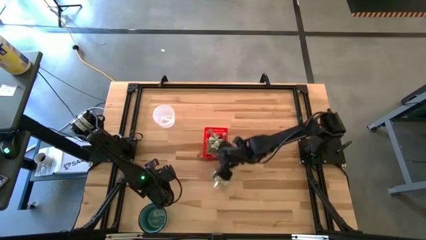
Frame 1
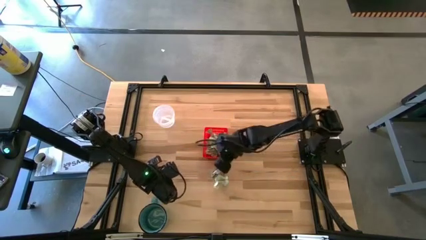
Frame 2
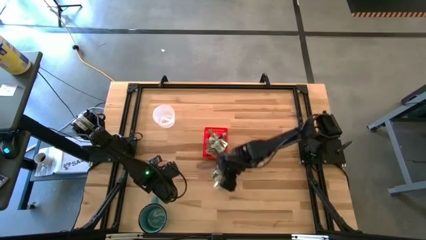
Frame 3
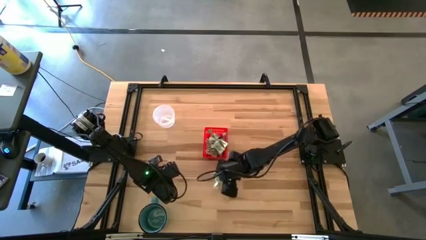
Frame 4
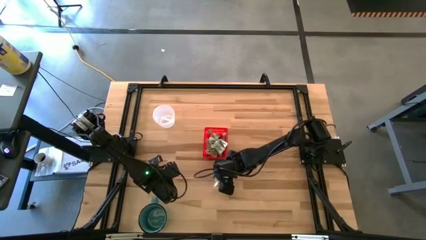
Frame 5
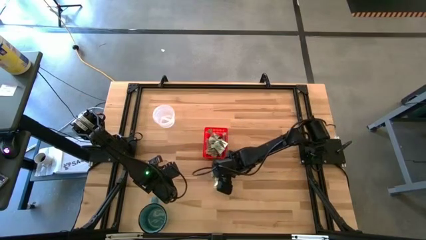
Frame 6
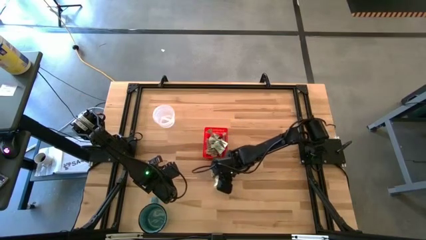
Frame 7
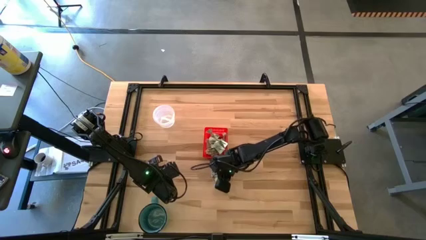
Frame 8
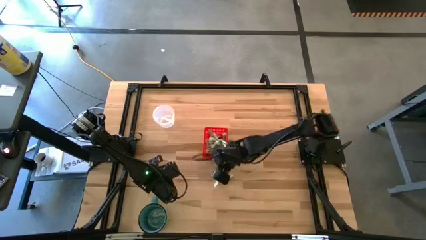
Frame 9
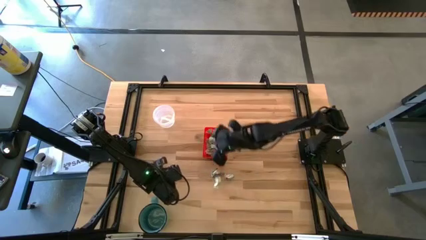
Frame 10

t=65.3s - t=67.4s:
Task: Pick and place Stevia / Truvia into bins
Put the stevia packet into the red basket

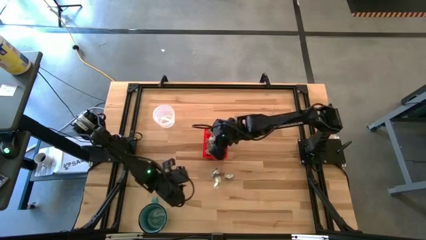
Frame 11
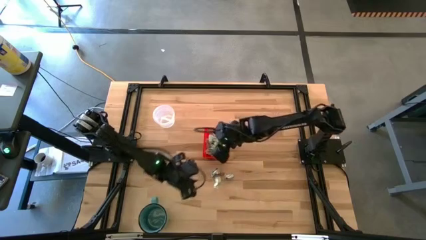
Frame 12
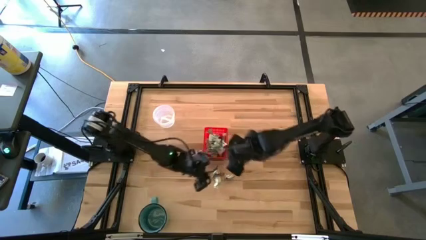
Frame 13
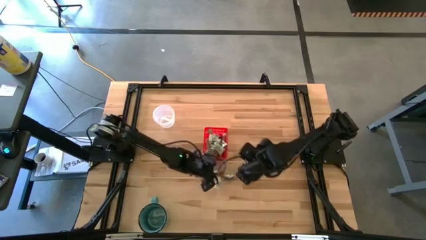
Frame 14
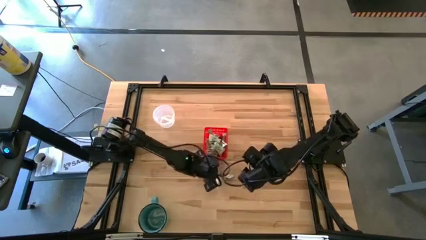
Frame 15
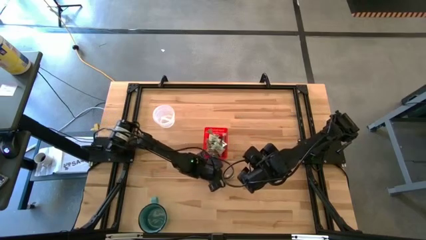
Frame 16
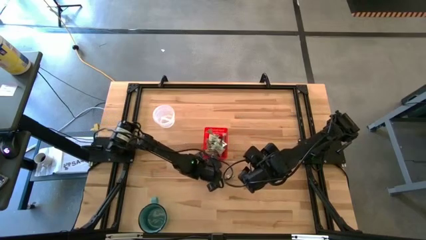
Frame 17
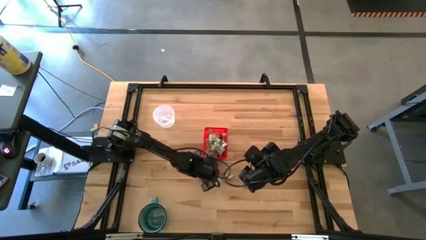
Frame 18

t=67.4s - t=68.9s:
Put the truvia packet into the red basket

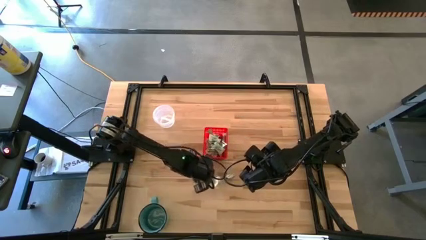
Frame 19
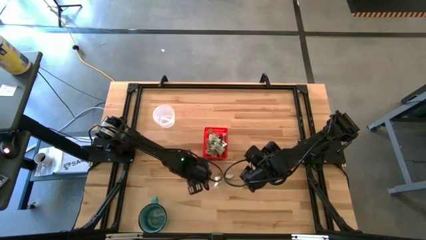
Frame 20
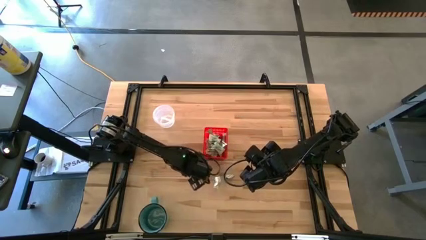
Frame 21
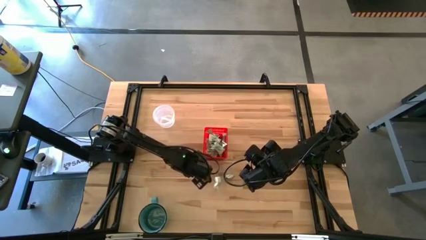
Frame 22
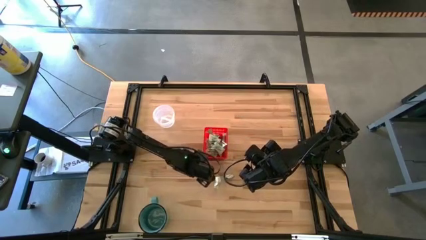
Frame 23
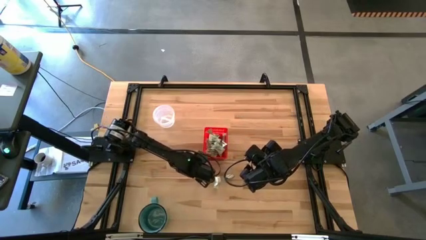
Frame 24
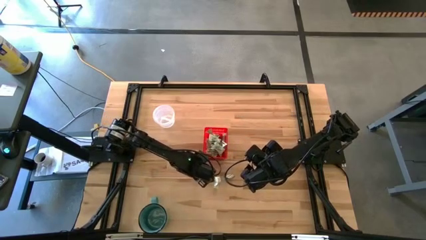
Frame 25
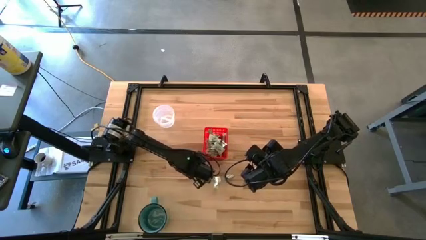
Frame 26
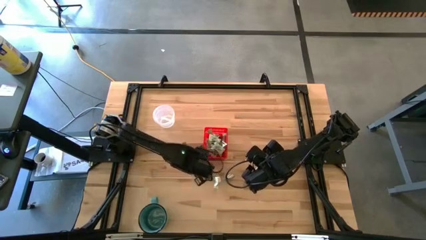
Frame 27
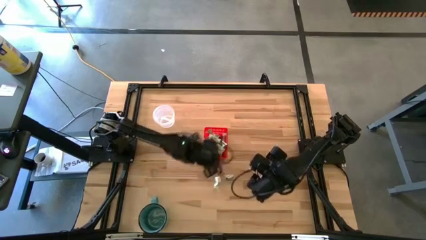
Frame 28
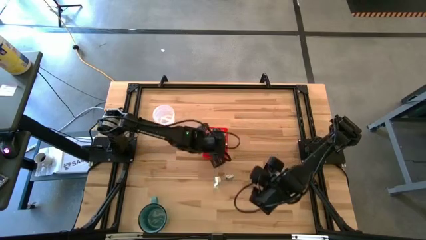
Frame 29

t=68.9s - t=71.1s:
Put the truvia packet into the red basket

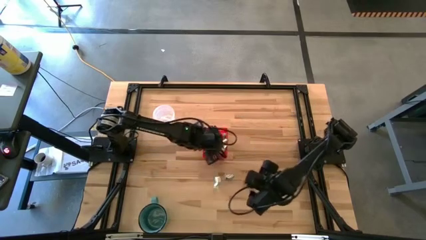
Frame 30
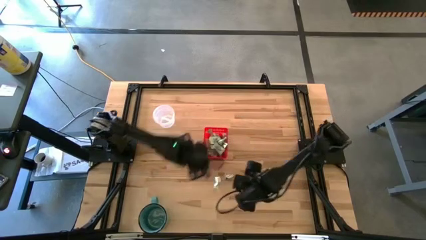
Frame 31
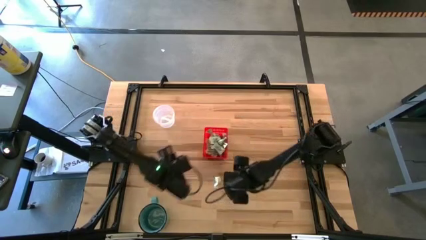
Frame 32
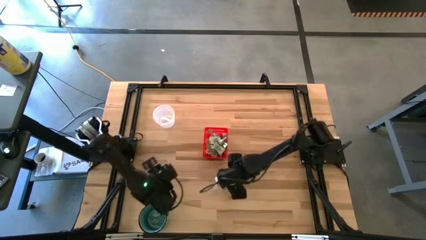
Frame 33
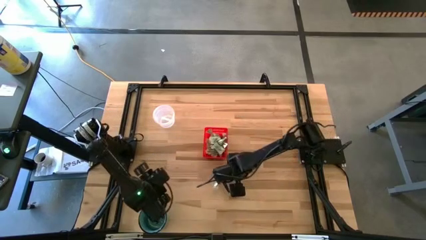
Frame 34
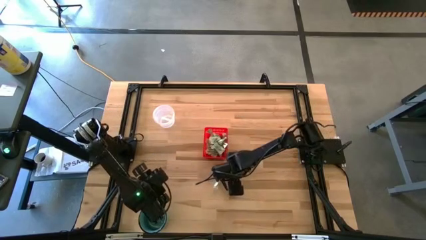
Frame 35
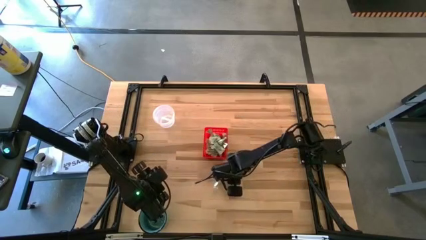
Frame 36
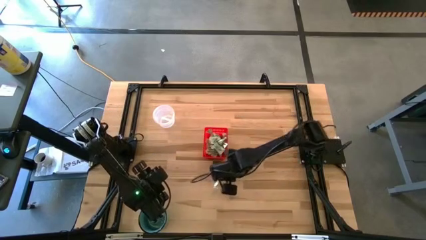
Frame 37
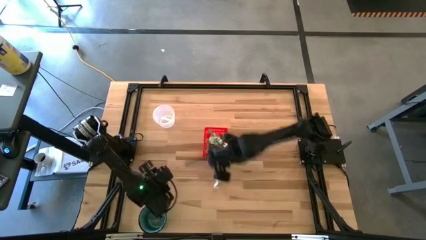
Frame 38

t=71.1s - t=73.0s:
Put the truvia packet into the red basket

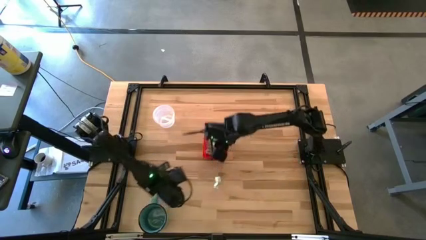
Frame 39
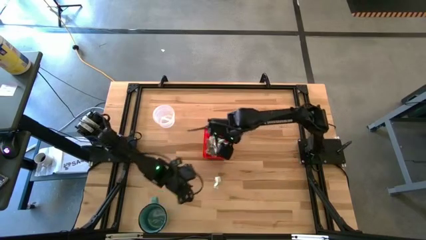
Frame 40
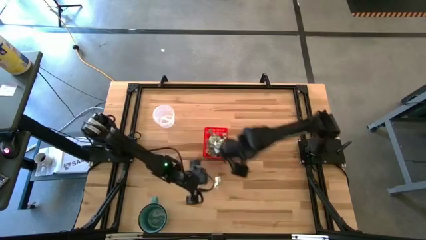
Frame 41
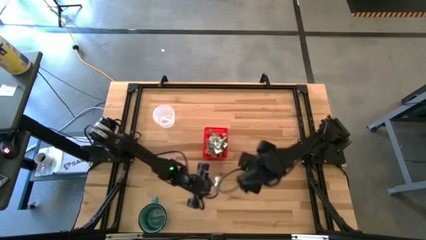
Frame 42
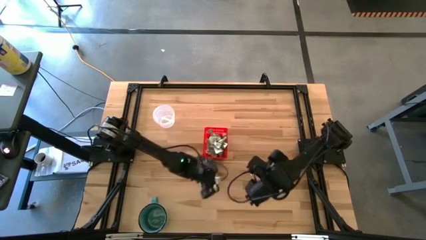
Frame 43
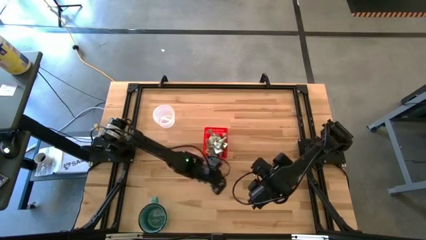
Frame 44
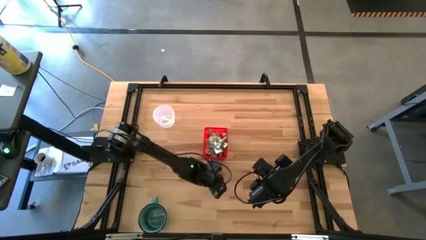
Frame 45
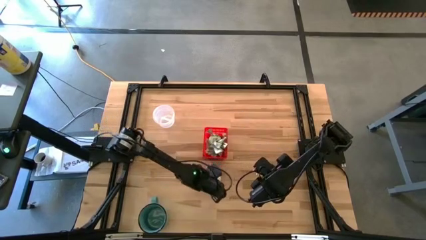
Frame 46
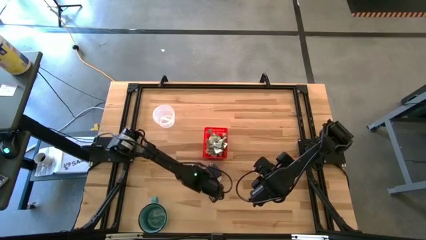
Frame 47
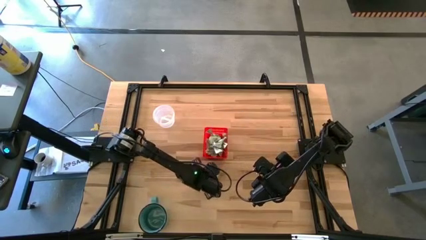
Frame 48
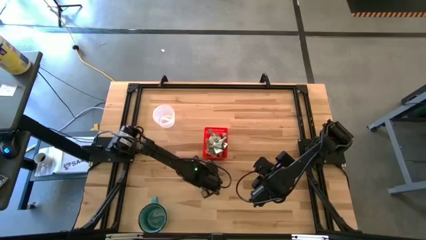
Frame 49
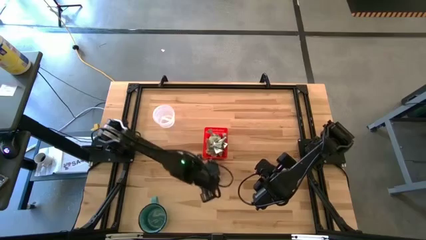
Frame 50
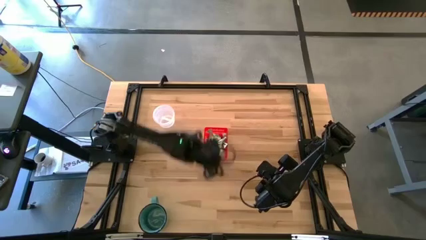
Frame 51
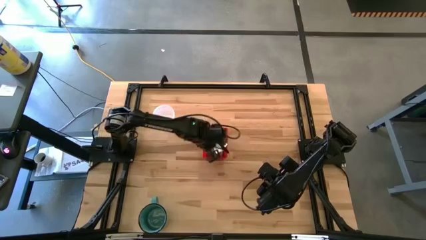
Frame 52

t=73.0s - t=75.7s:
Put the stevia packet into the red basket

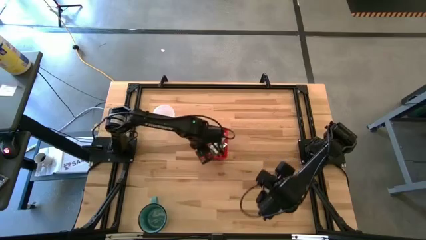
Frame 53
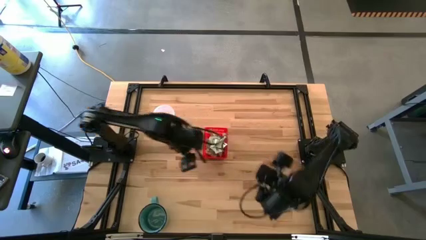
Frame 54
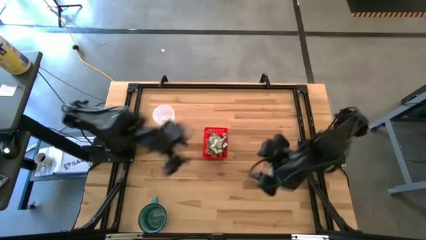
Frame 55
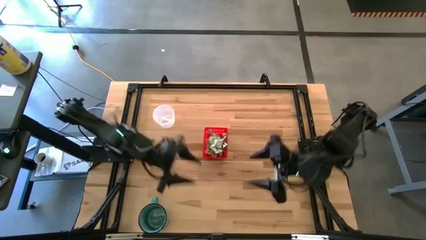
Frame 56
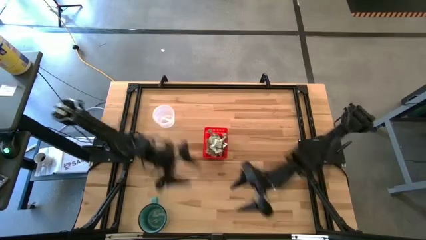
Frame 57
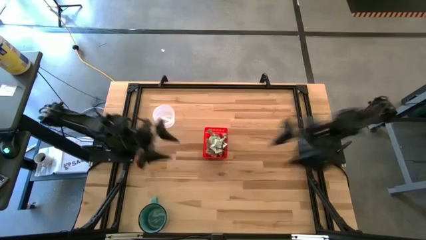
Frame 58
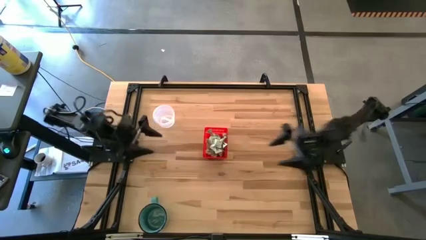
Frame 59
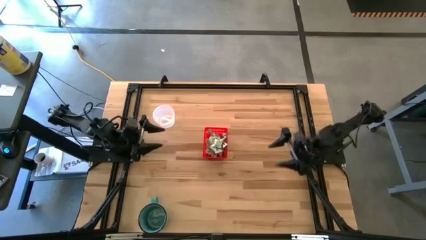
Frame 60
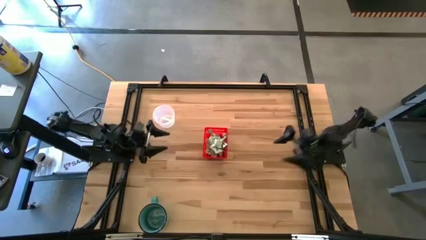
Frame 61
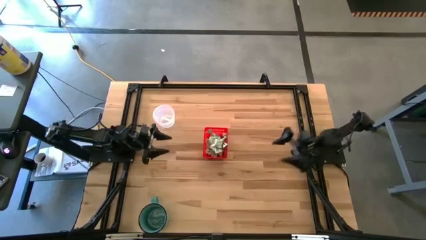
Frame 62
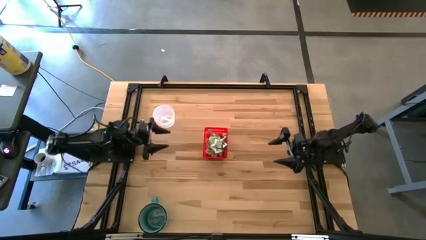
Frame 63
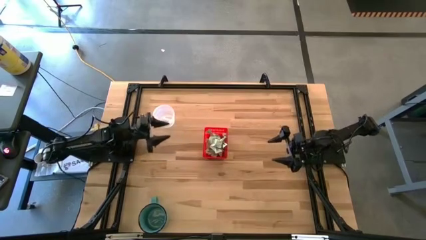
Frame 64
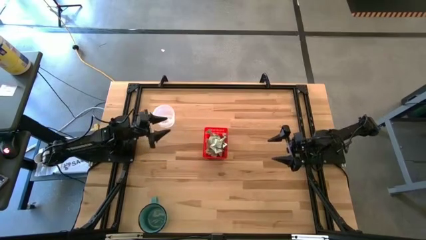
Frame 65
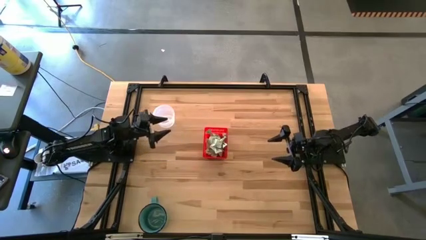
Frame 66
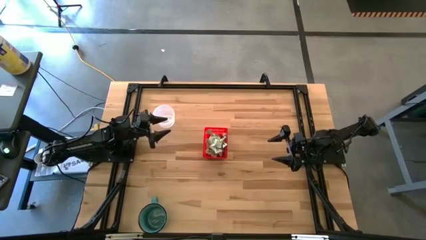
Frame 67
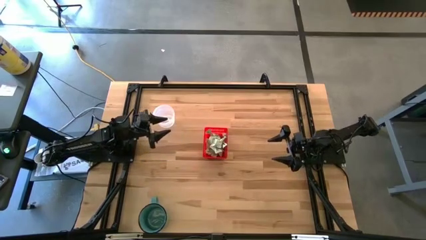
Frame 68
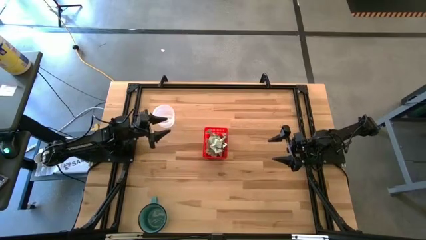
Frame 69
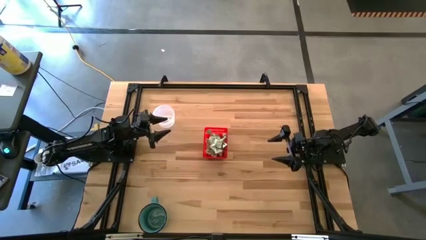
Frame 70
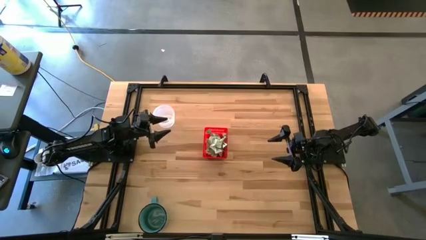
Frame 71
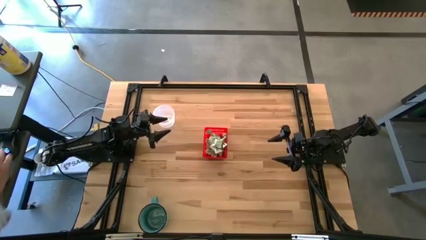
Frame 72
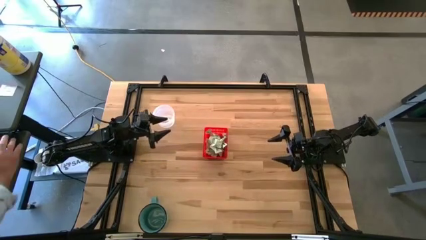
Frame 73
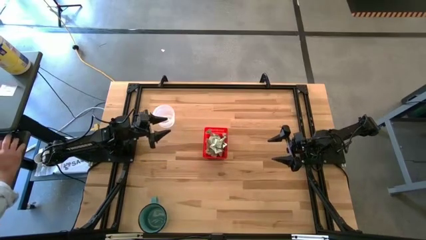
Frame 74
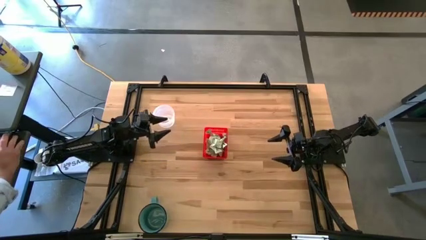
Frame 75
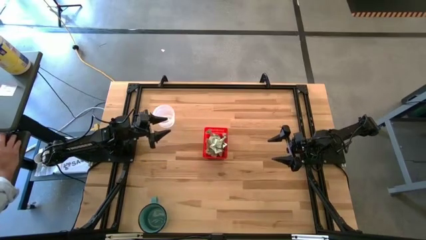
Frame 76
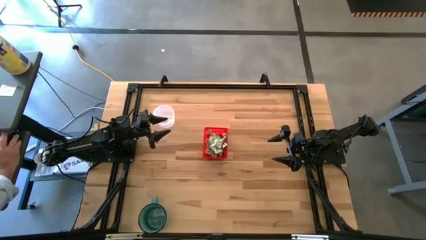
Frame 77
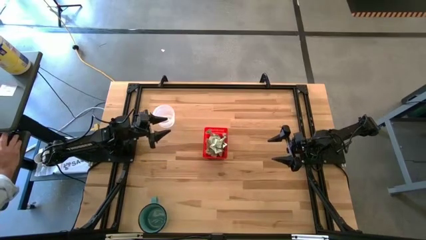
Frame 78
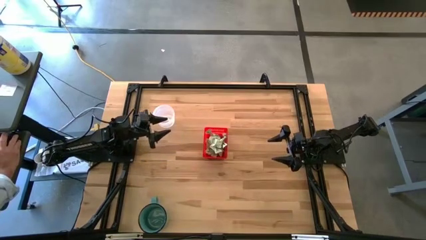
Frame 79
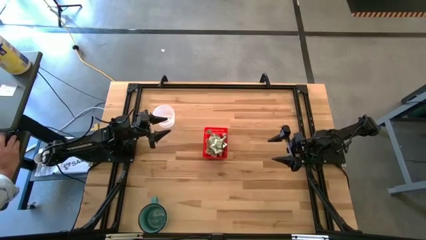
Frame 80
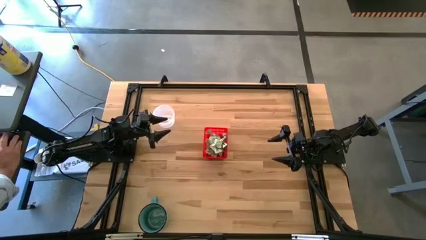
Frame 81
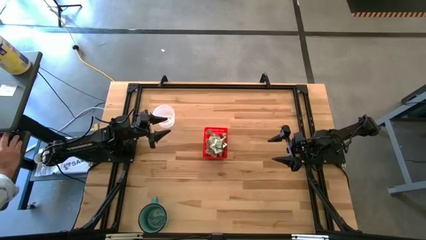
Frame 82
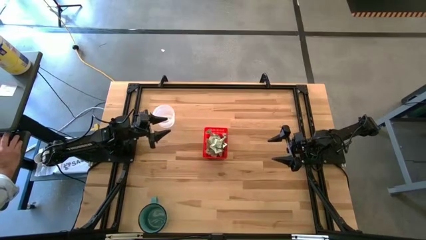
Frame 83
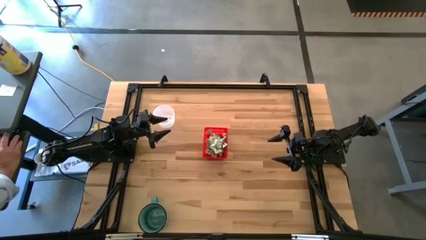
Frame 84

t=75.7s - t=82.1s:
Return to Home Position
